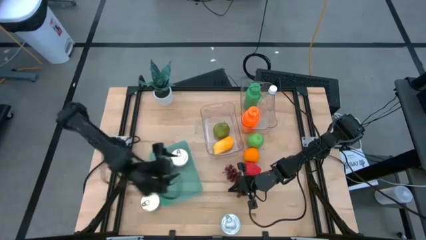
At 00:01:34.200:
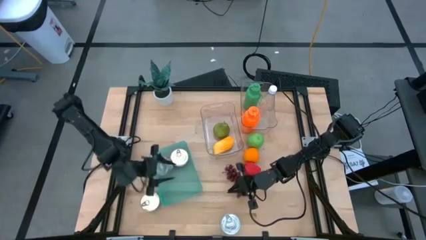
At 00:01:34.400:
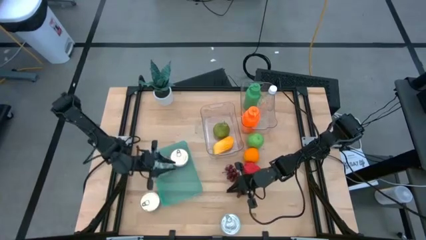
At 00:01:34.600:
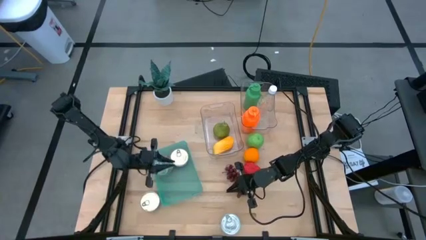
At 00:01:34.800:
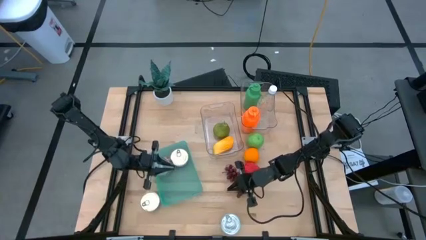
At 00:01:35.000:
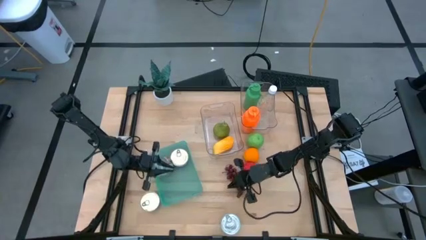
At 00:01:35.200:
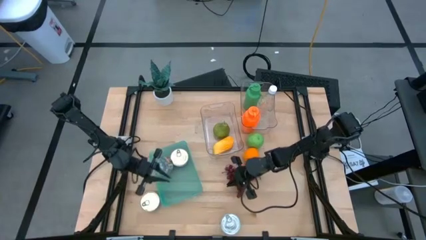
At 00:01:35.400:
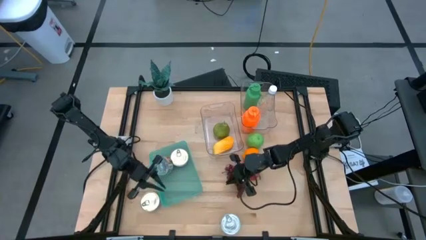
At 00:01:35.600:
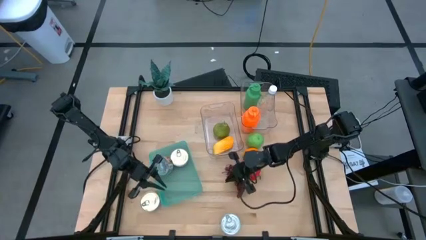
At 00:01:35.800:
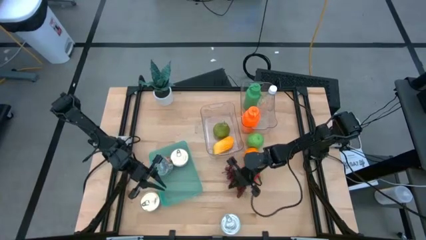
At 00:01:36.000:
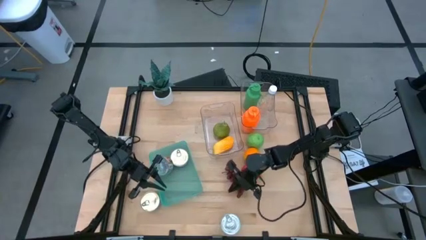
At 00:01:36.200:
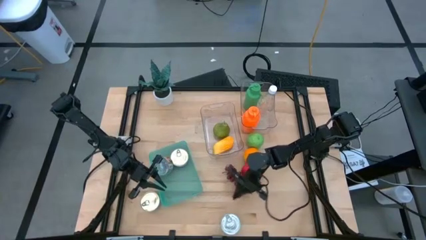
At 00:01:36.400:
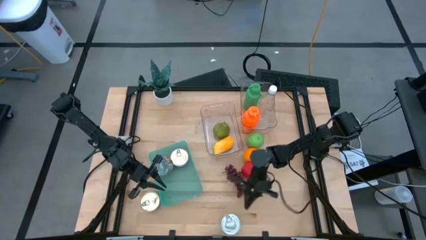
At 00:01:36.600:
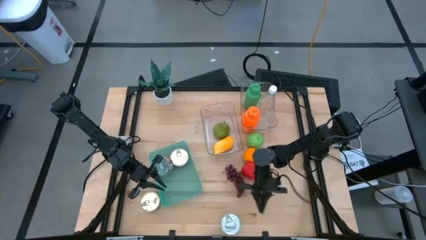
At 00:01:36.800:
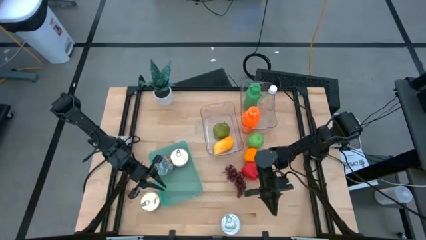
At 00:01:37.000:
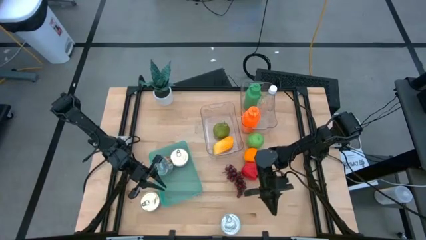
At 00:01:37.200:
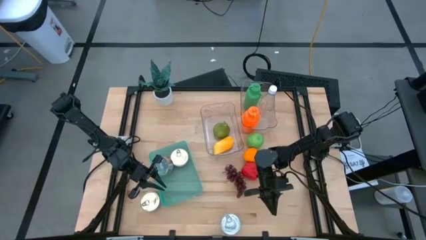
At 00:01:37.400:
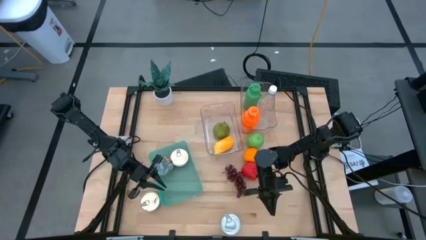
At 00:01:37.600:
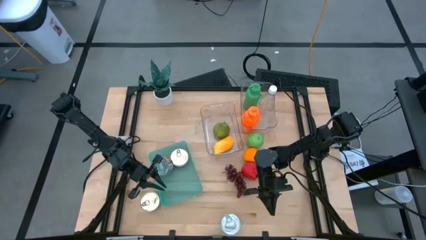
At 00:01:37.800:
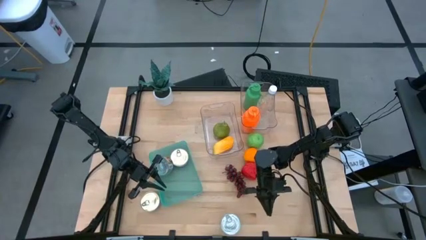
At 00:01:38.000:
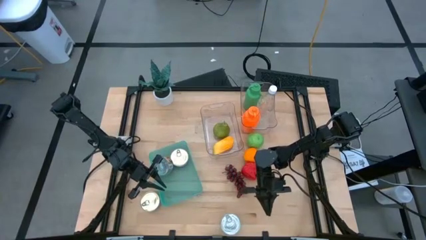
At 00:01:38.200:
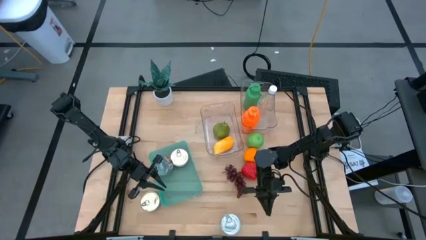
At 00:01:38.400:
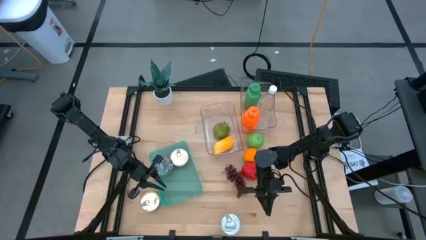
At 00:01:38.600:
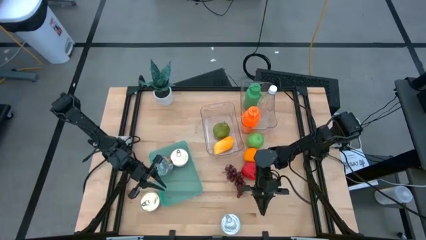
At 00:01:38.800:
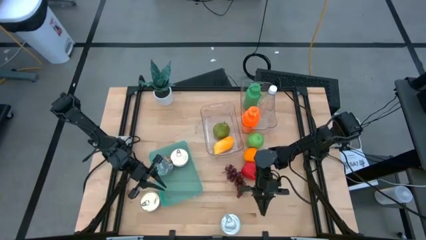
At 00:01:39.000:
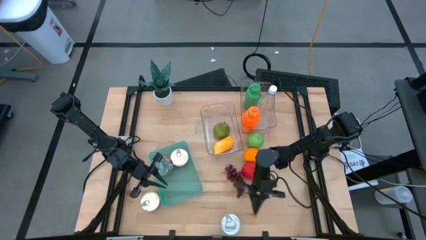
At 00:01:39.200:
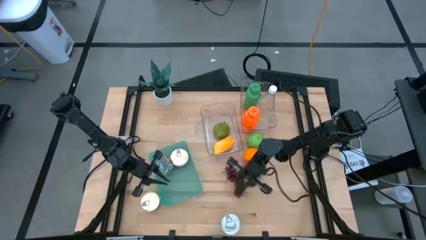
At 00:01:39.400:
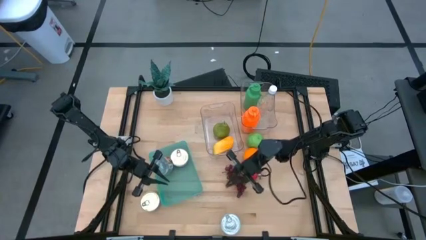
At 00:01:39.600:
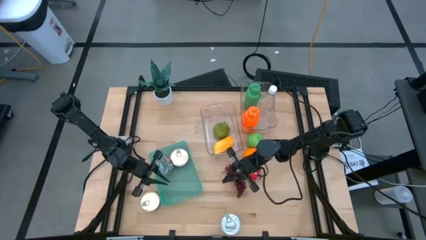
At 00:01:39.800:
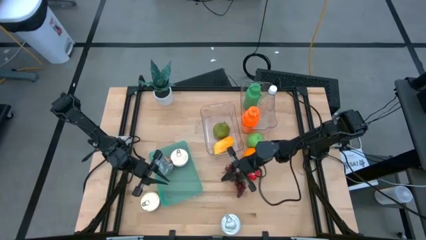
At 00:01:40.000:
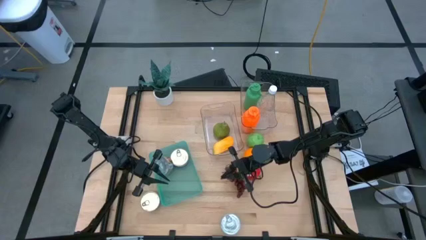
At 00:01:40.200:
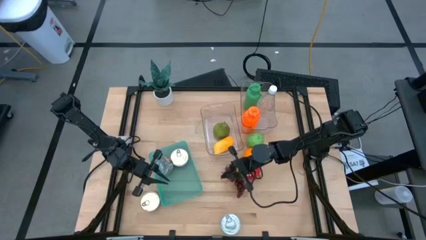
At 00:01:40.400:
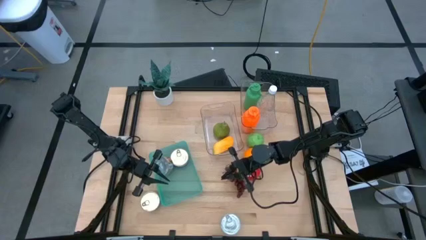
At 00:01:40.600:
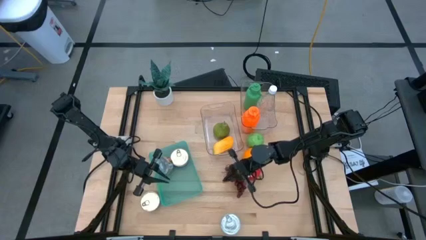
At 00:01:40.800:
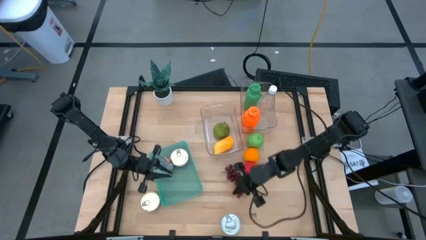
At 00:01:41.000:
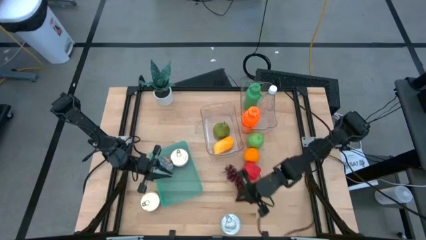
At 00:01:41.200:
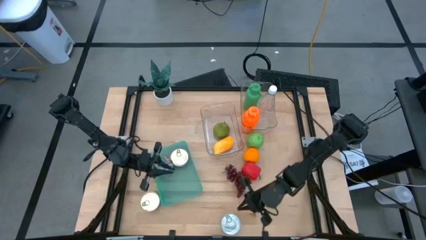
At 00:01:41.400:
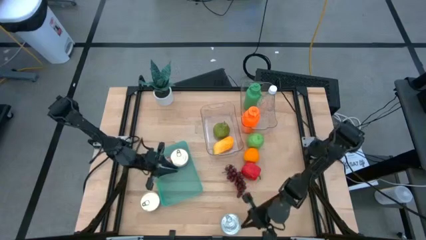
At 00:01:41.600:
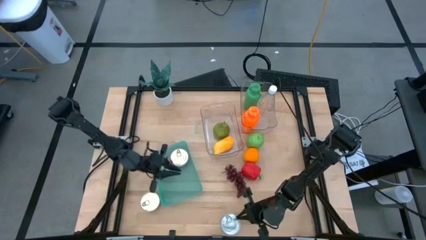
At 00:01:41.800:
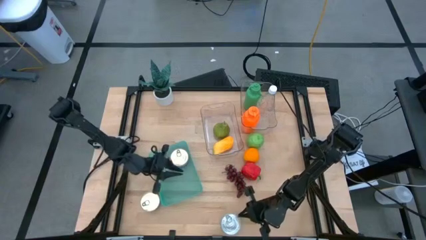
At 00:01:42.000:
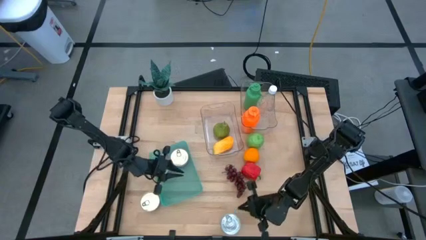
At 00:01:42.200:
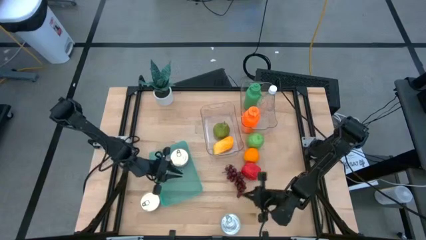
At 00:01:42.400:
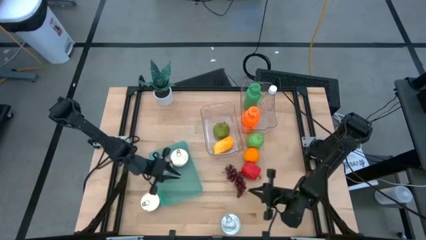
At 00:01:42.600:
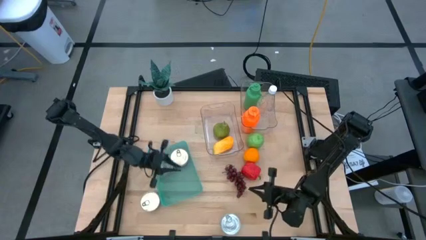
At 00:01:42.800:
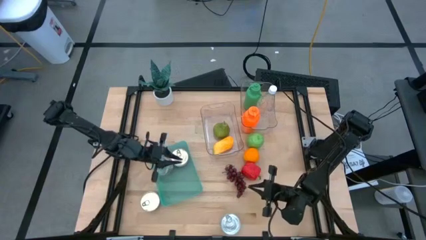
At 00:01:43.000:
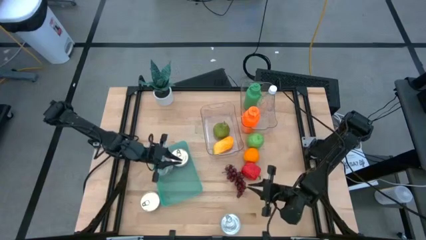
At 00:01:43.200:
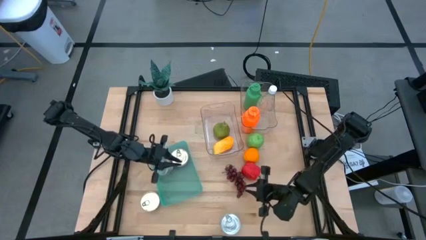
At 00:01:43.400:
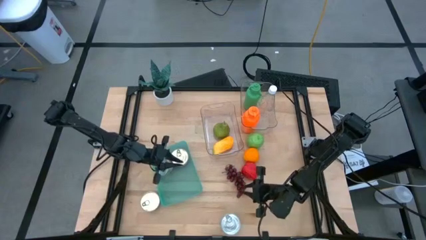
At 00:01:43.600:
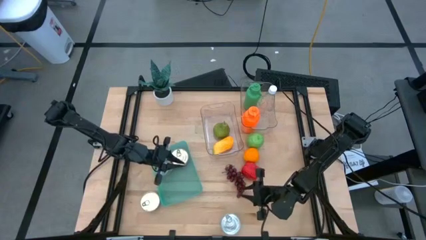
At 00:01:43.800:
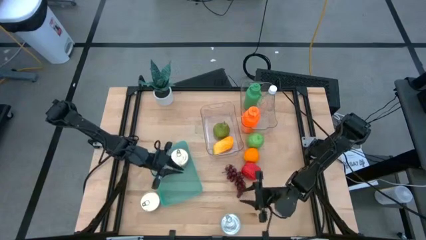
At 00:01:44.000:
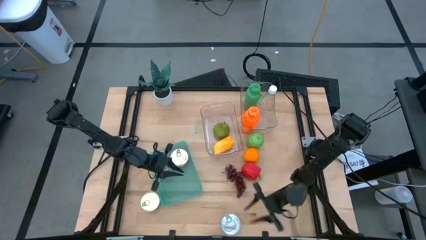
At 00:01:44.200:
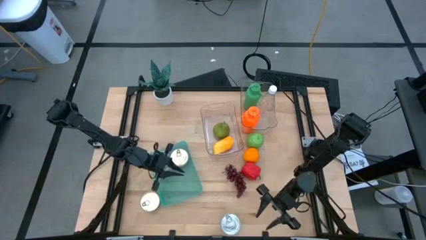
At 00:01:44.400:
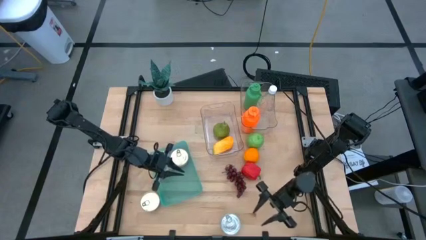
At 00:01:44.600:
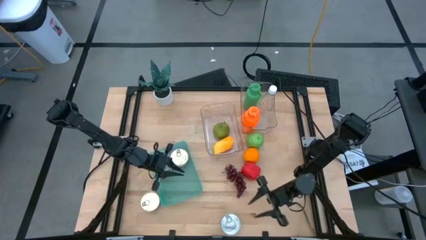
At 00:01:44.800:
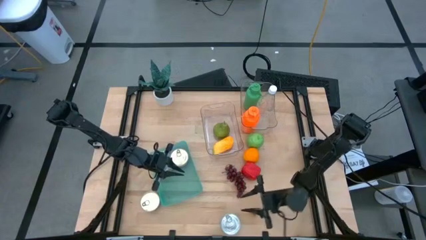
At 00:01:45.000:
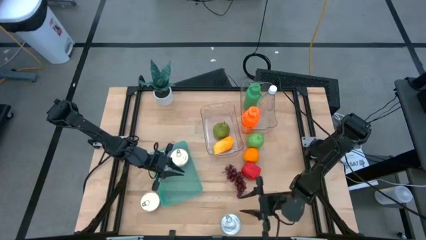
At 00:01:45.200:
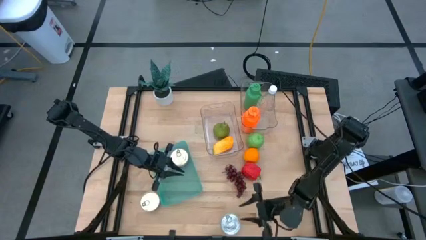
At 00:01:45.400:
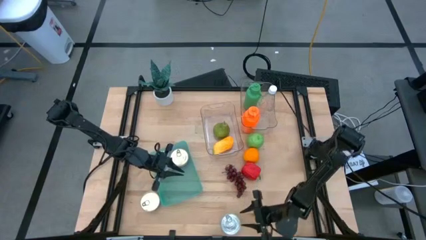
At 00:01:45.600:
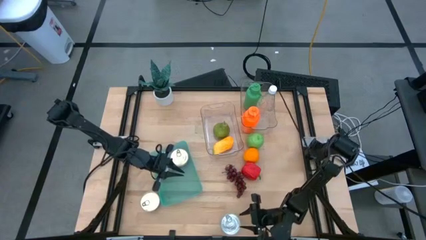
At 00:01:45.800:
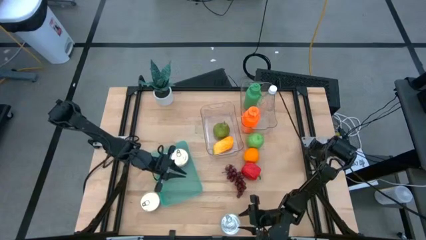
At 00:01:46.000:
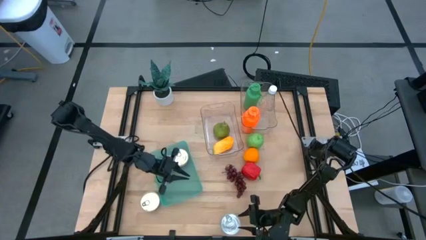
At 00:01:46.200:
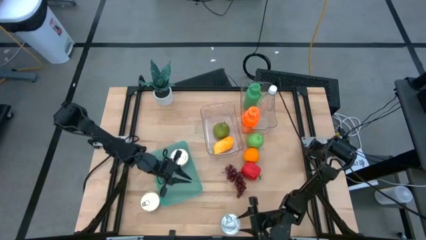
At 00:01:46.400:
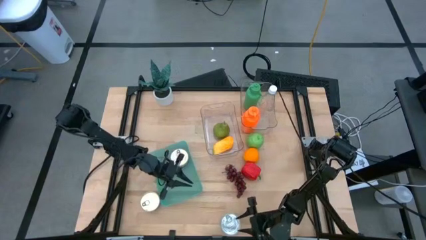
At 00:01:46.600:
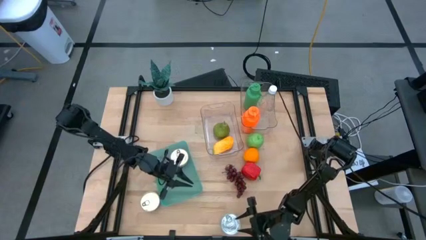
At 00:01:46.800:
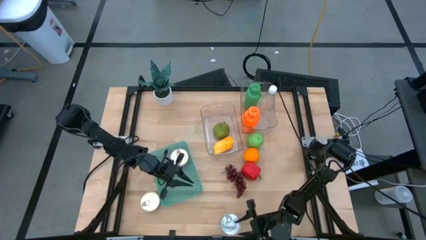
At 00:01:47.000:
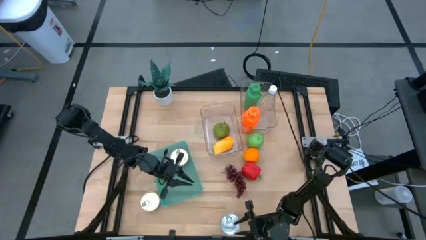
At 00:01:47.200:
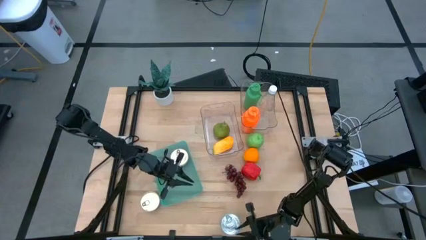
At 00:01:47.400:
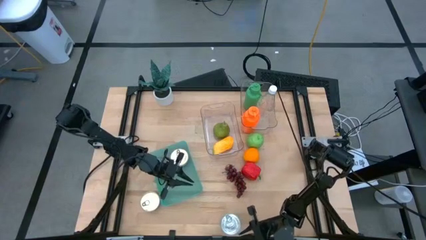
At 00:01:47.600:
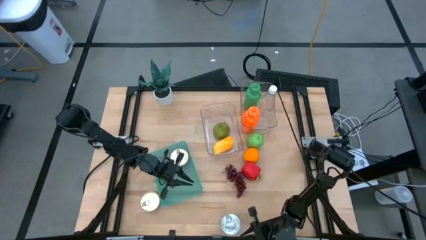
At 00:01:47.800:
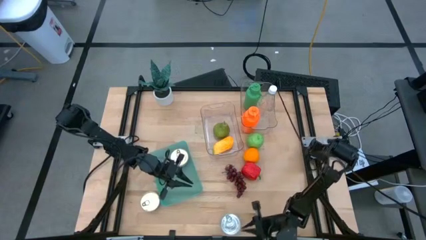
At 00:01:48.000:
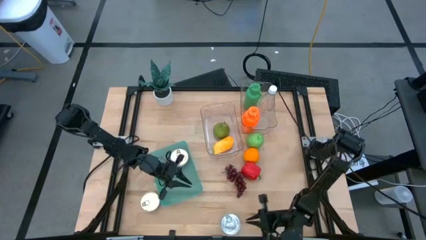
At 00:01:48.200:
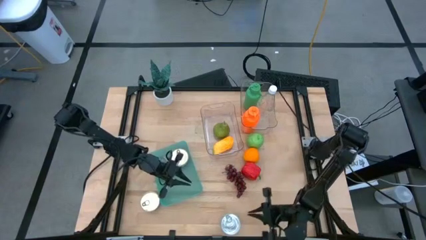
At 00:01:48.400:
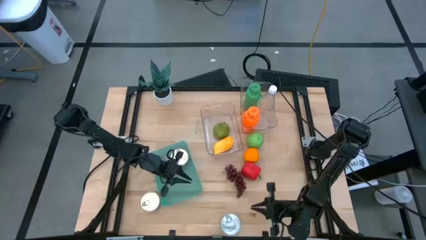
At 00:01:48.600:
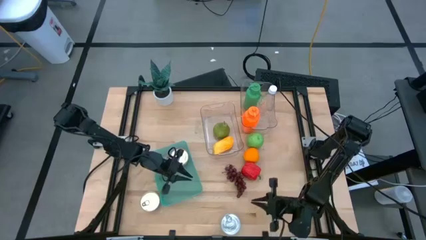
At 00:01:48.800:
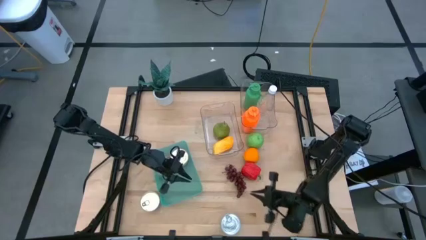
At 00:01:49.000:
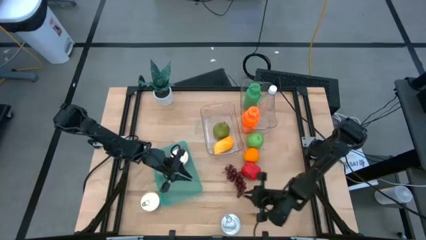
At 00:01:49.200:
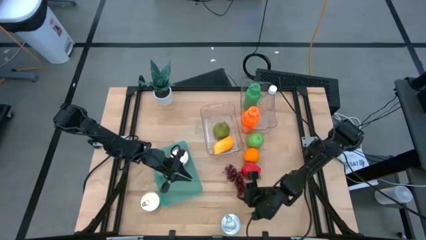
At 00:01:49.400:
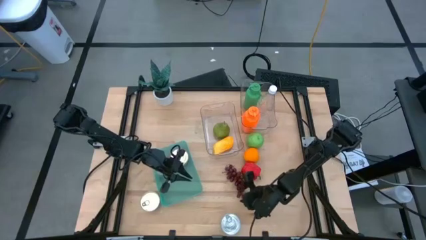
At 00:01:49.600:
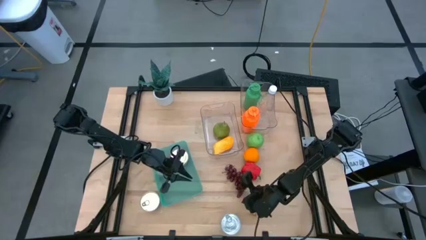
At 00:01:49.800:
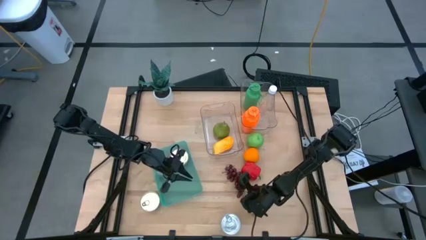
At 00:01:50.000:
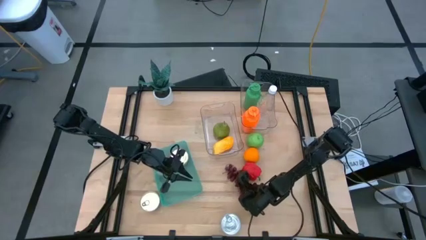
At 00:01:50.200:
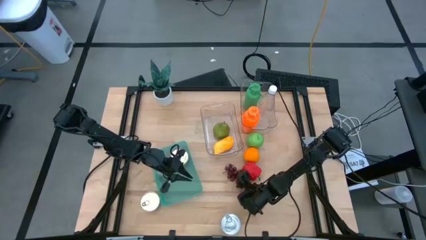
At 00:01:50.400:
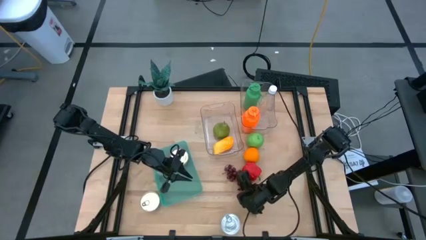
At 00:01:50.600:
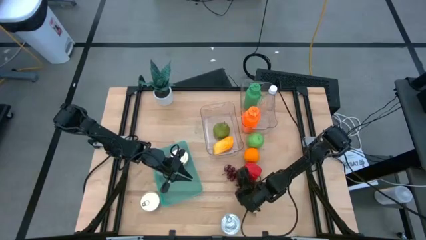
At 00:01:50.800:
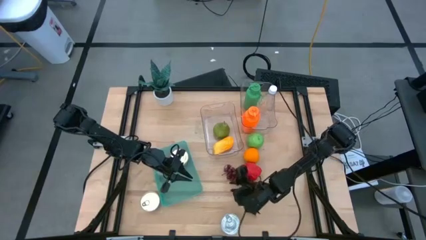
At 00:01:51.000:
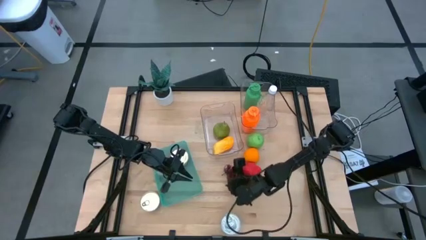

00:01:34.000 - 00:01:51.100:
Task: Pick & Place Food Item
Put the red grapes into the bottom transparent bin
